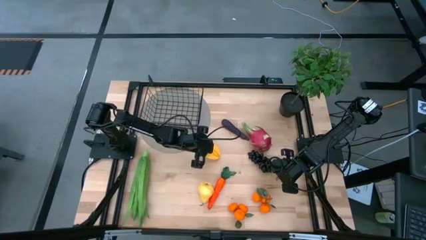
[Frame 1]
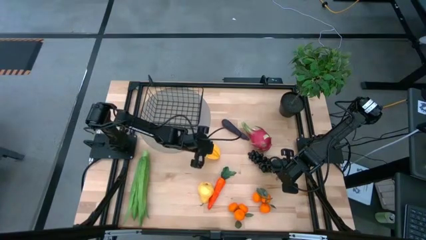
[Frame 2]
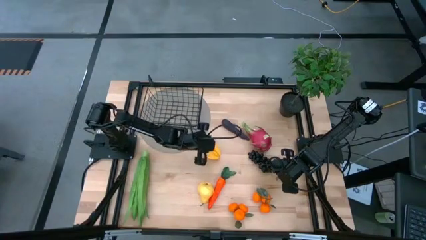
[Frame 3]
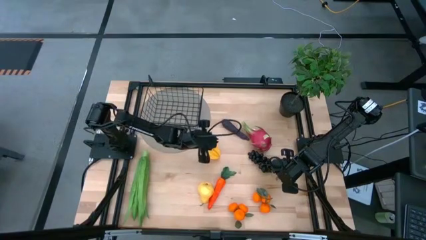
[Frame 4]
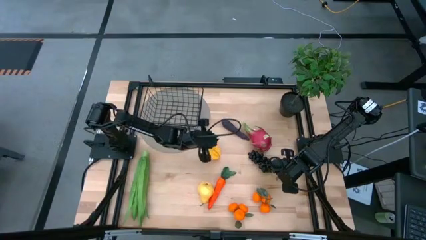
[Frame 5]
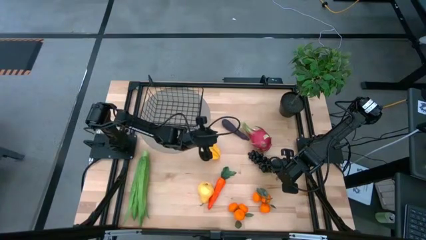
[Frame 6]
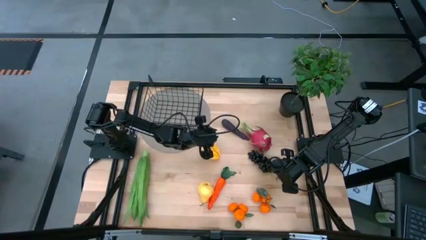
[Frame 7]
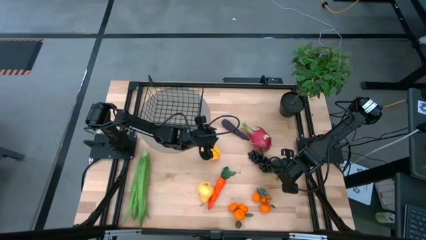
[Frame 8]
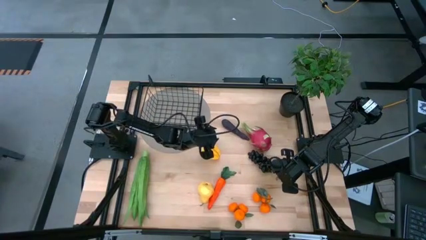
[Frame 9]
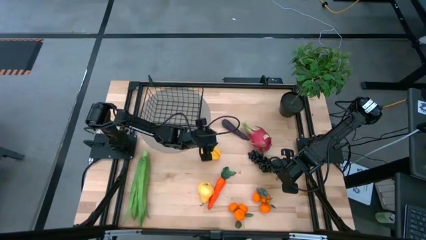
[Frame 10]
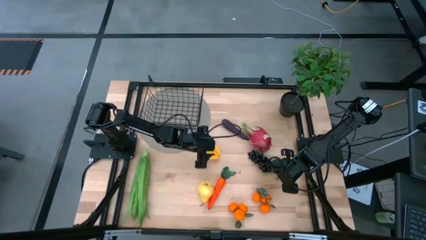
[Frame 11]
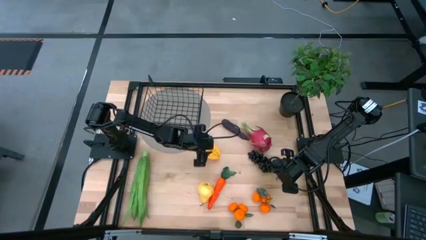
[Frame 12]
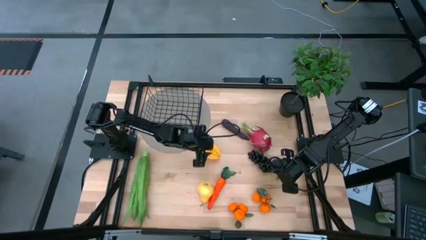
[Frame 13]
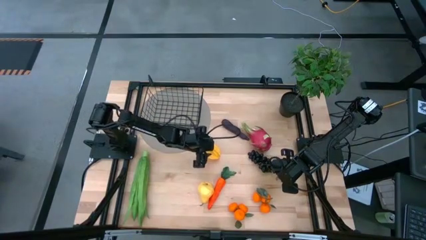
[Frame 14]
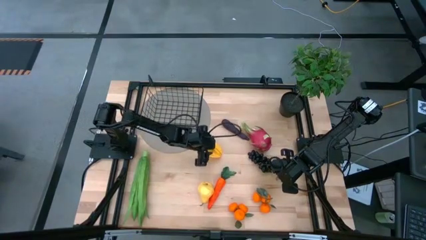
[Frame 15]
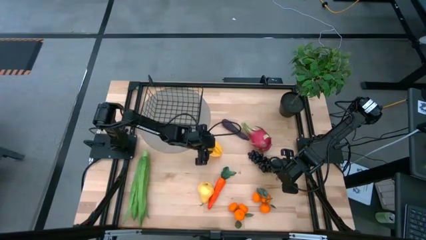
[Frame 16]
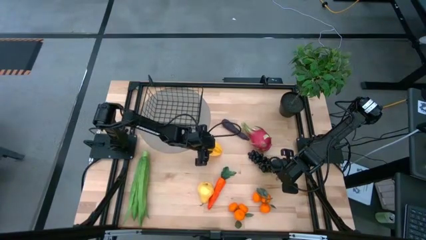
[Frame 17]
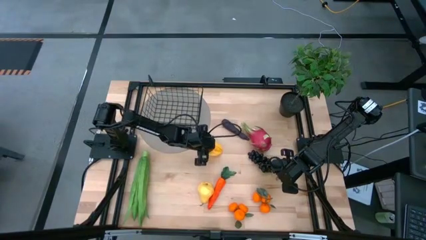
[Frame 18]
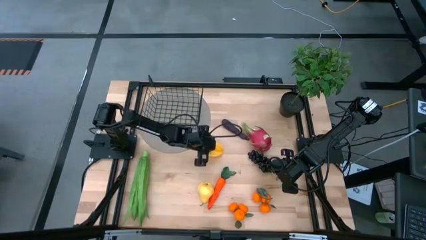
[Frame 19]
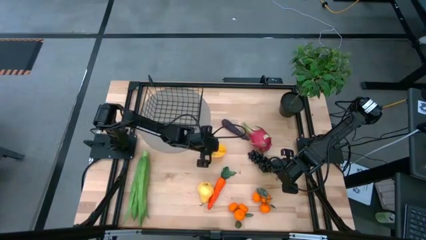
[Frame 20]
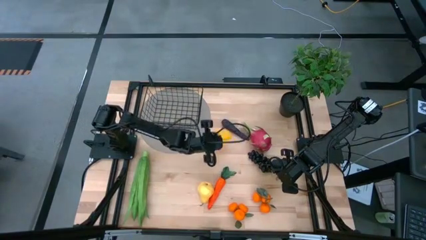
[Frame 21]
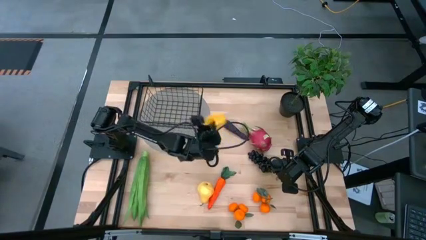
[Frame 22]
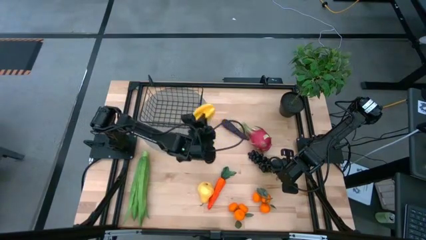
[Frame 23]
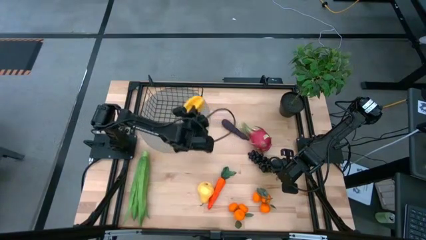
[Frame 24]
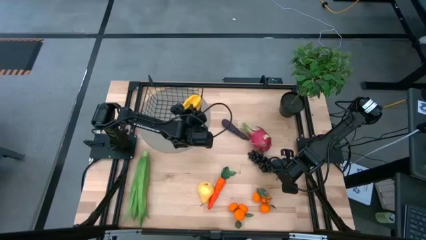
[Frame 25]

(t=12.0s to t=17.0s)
Task: Build produce basket
Put the yellow starfruit into the black wire basket

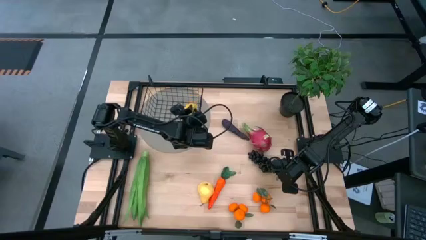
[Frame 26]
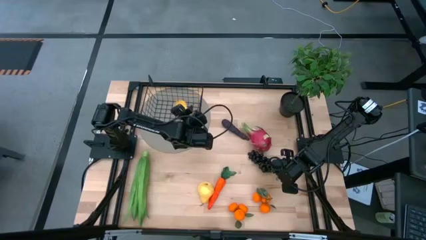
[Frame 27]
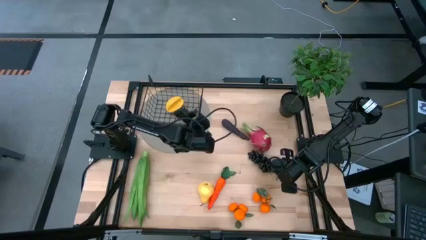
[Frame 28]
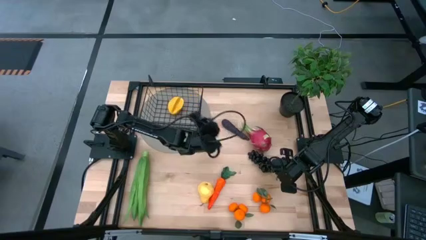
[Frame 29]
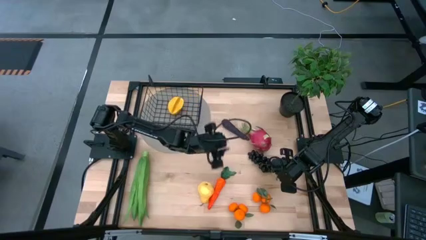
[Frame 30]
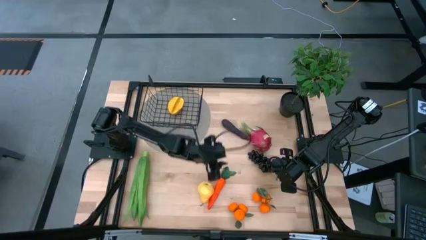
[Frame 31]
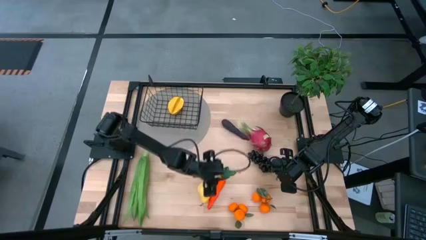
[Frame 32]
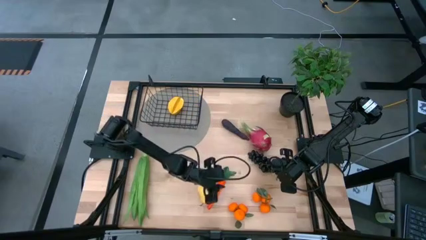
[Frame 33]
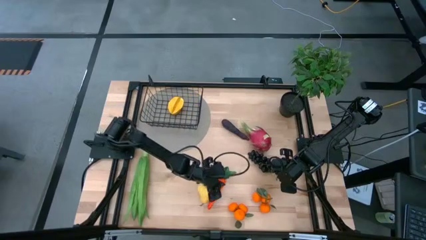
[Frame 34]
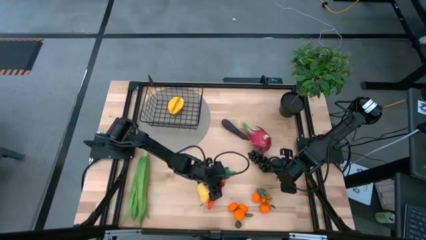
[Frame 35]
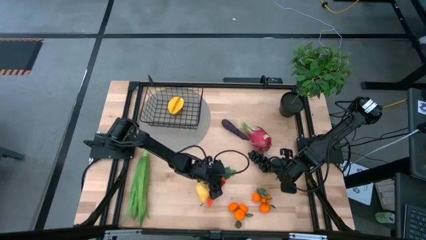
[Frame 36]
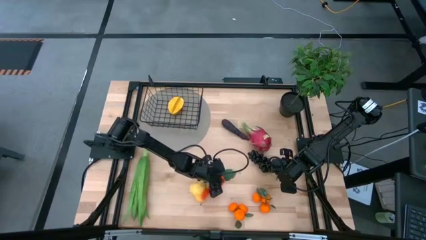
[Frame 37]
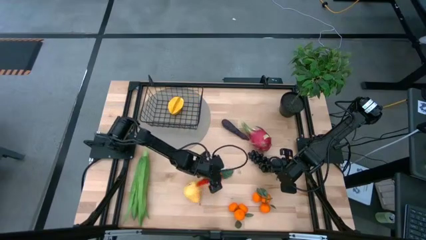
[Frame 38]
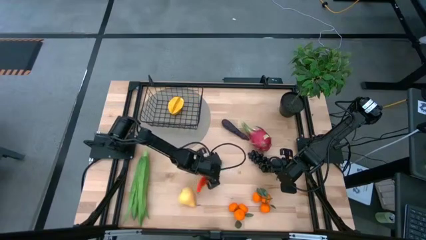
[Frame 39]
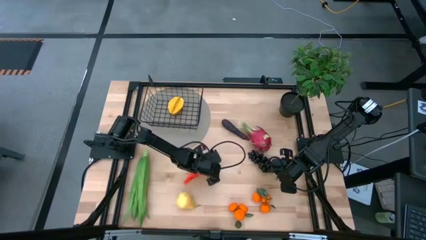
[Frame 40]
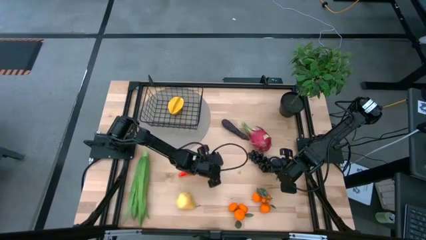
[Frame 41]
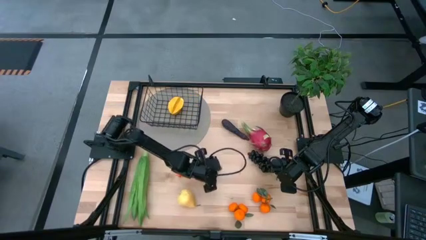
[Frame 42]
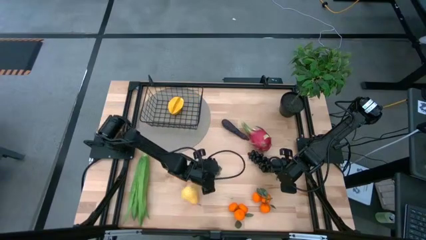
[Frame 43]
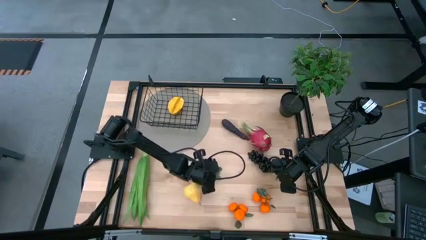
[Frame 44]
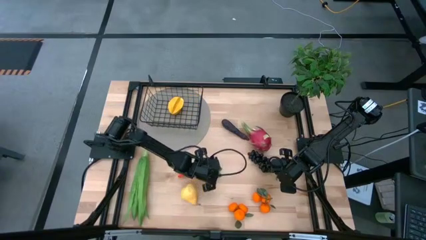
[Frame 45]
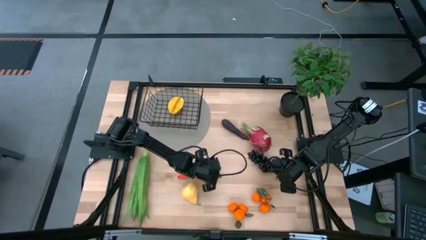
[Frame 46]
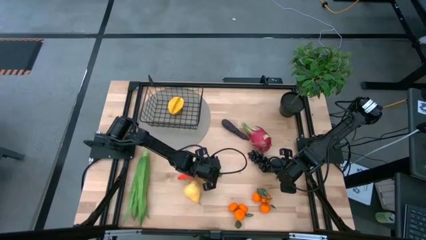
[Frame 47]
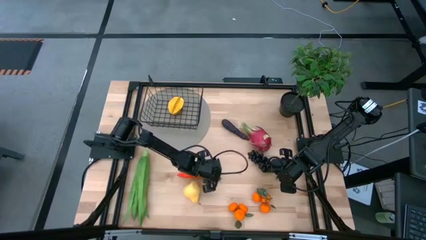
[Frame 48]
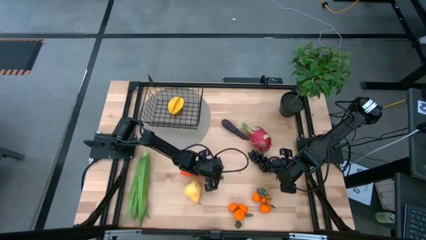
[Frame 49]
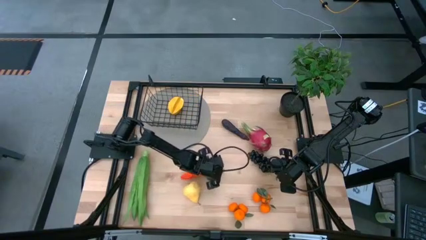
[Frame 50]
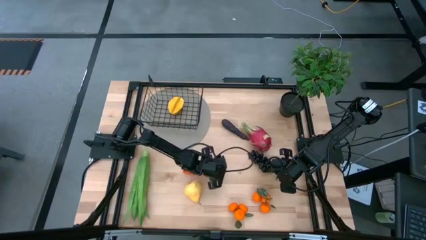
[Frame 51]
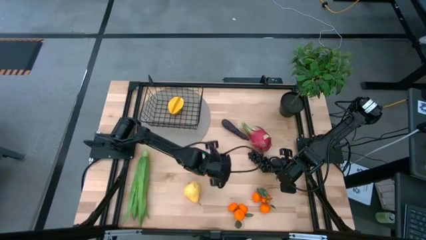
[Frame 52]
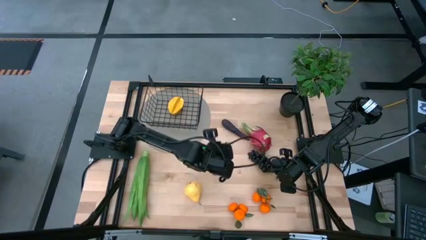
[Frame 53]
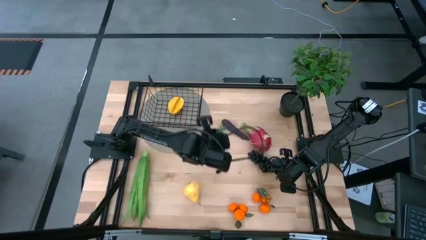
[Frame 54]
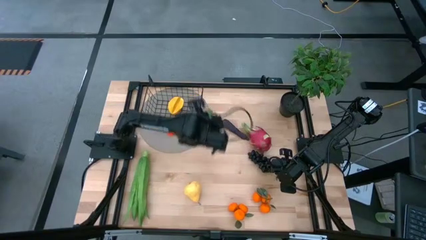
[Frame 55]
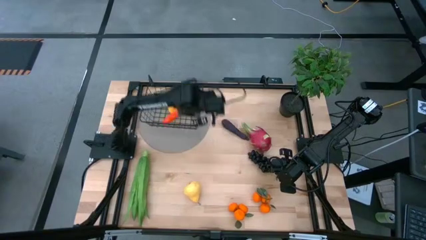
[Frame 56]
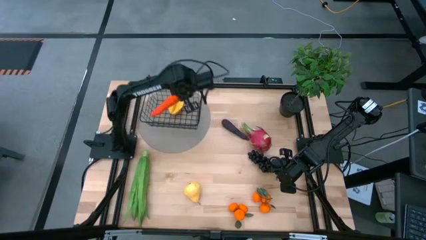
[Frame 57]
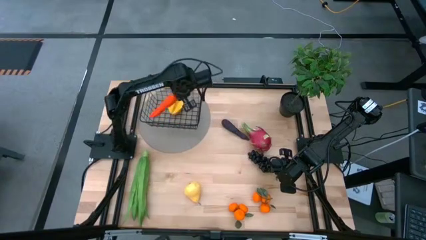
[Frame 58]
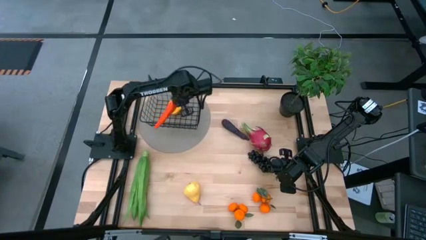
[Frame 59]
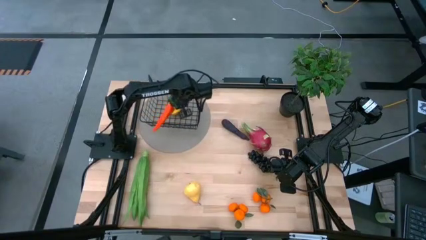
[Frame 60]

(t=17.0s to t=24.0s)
Put the orange carrot into the black wire basket

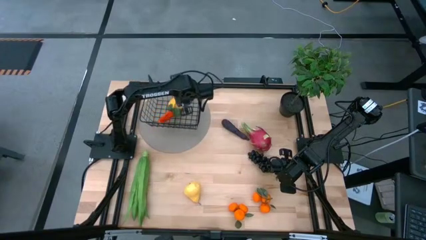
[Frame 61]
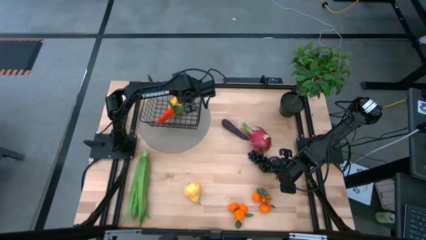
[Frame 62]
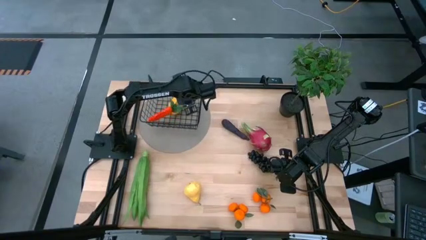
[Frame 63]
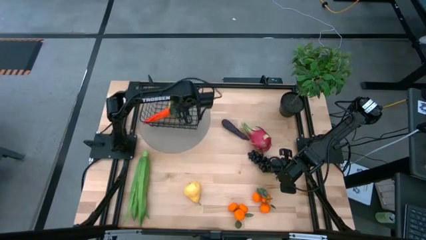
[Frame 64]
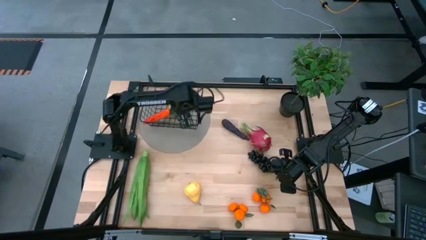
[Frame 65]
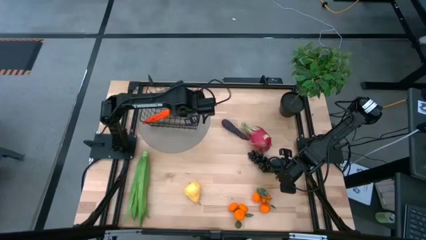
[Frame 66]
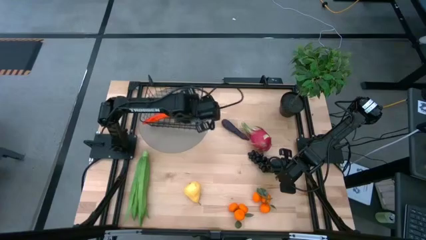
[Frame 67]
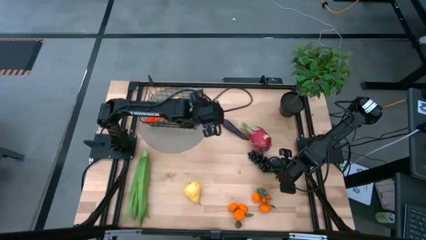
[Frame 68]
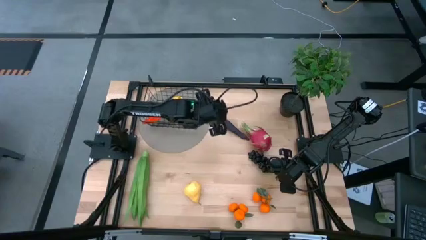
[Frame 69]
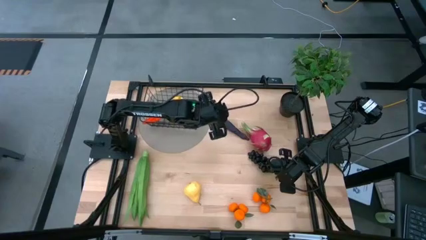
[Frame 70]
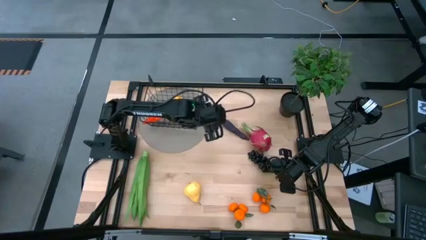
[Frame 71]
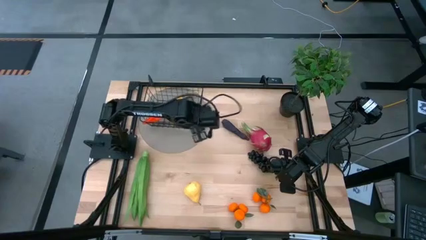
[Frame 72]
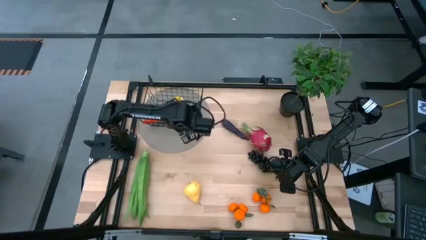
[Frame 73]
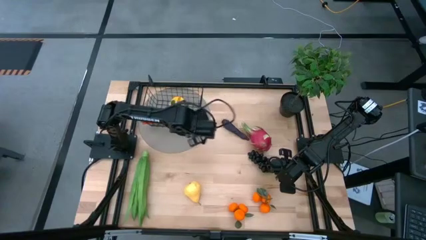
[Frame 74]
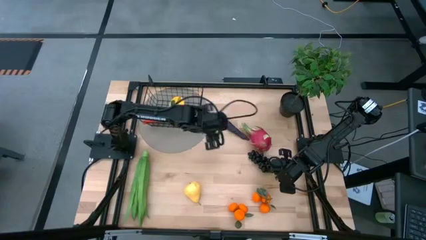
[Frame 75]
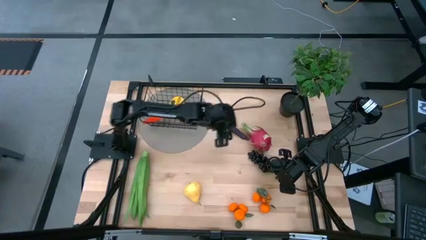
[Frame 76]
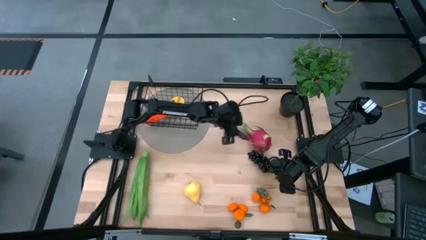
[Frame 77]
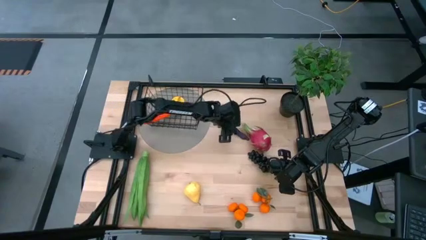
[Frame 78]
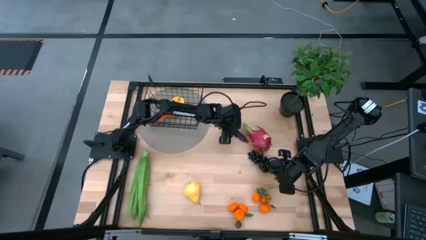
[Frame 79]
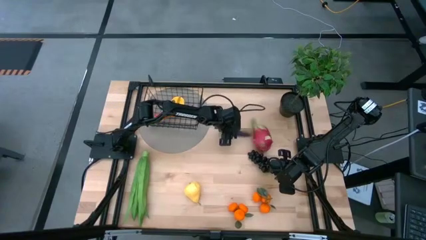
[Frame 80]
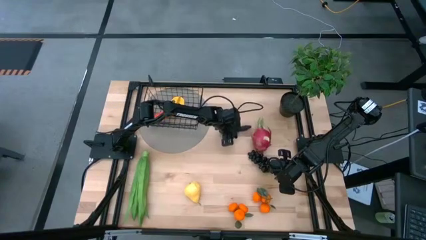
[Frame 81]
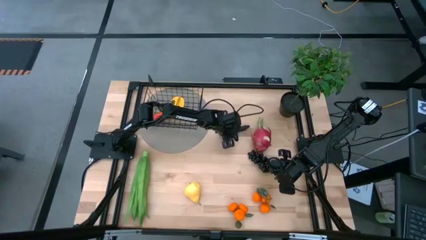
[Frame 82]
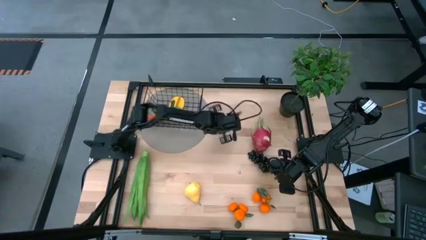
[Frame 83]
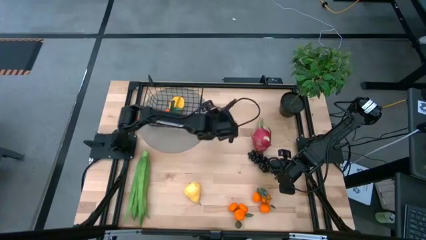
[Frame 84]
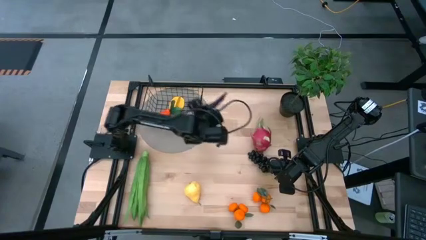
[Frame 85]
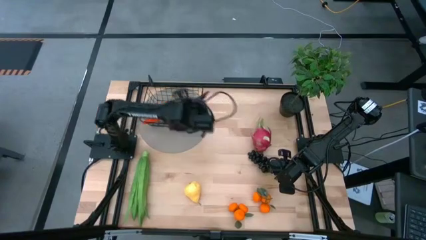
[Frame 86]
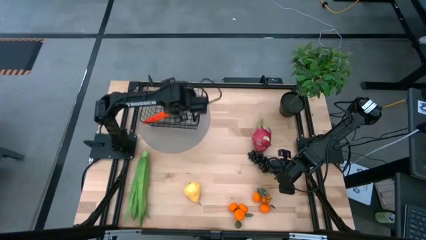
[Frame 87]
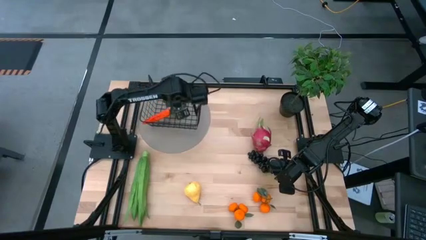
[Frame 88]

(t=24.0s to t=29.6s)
Put the purple eggplant into the black wire basket
